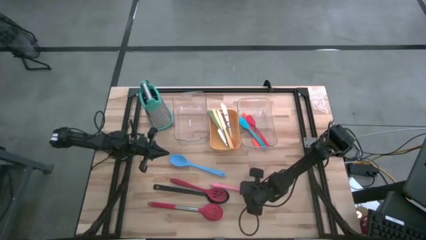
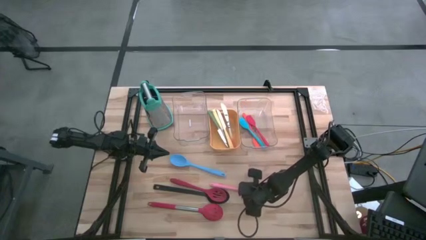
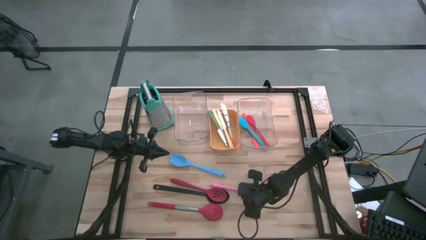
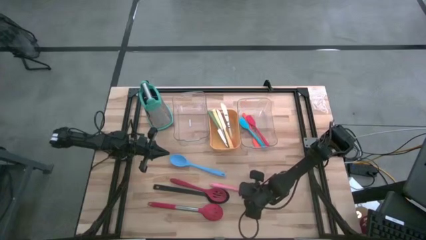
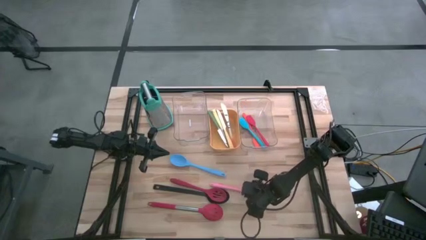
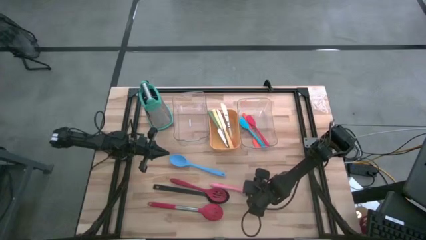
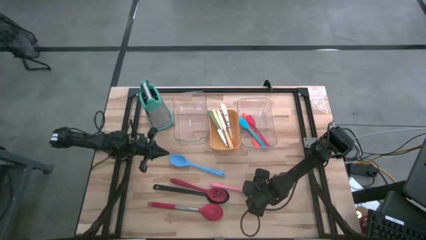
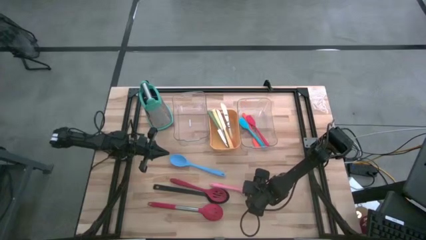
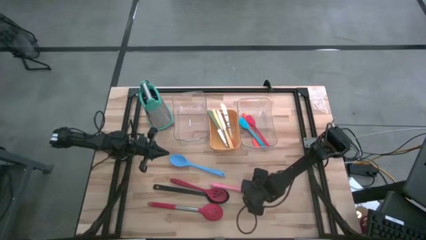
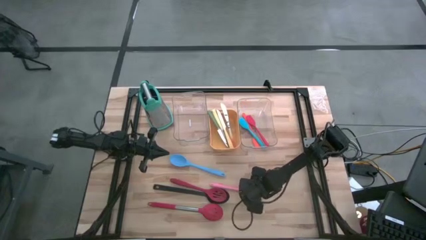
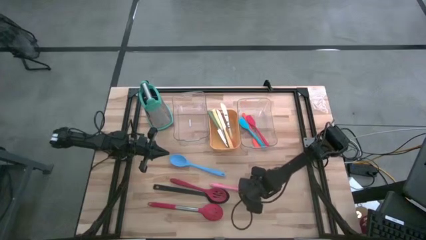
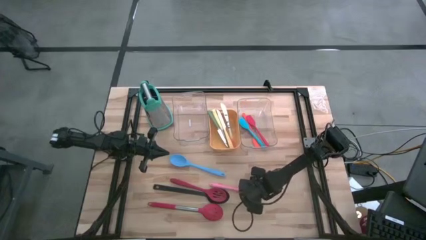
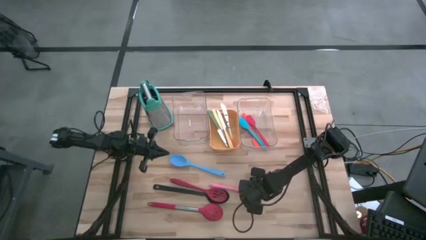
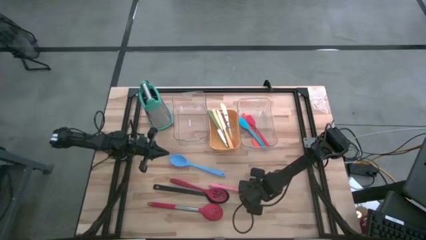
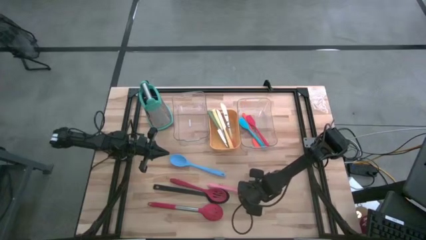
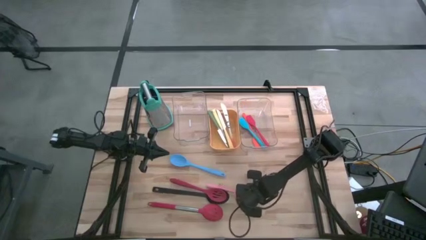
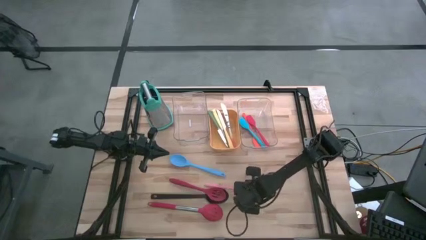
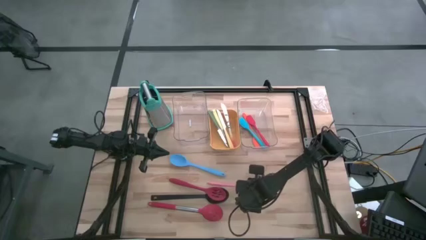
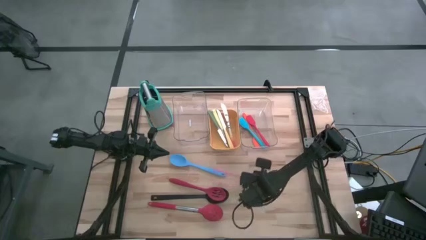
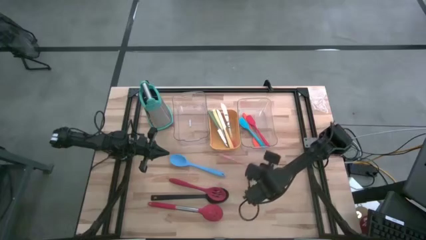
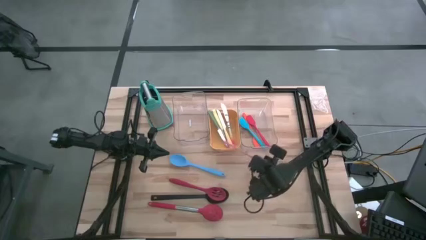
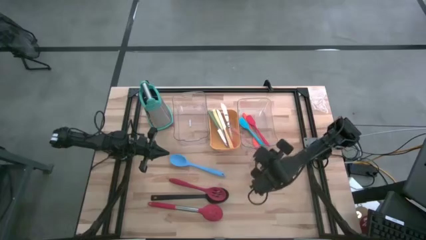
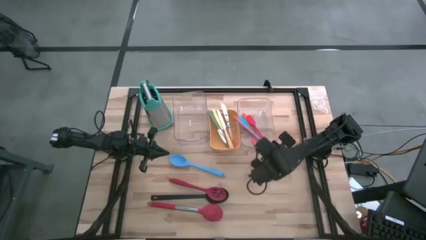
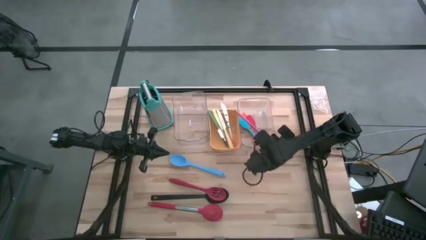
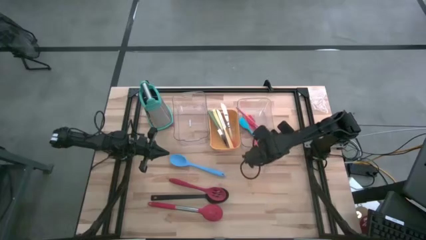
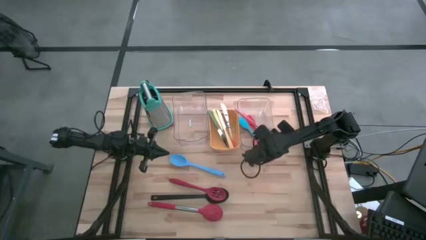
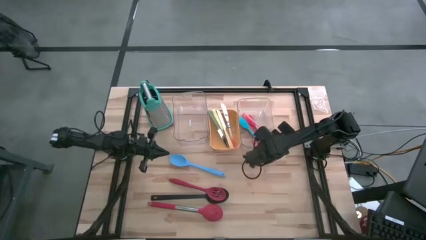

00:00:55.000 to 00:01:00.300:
Task: Pick & Place Kitchen Items
Put the pink spatula into the right transparent bin

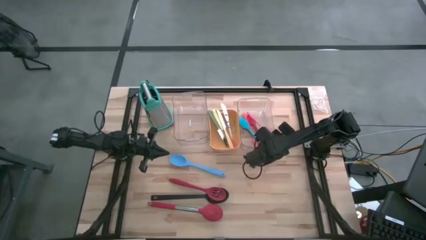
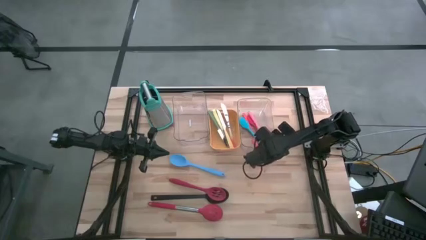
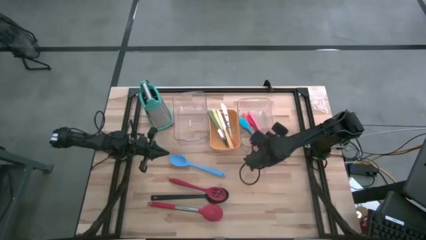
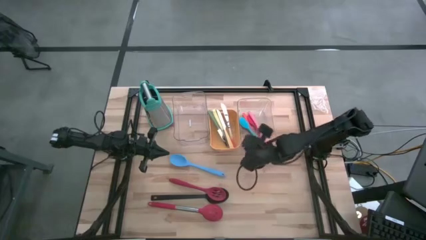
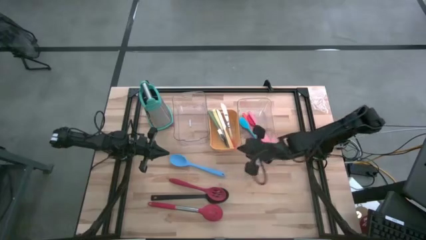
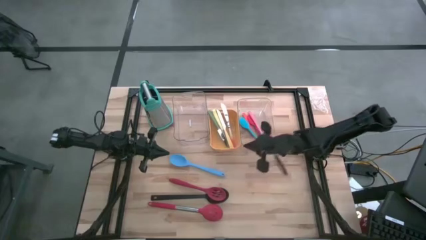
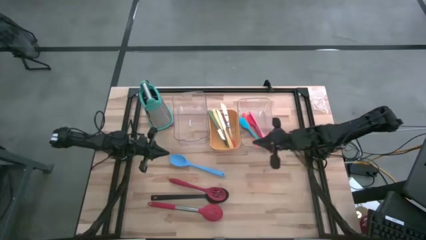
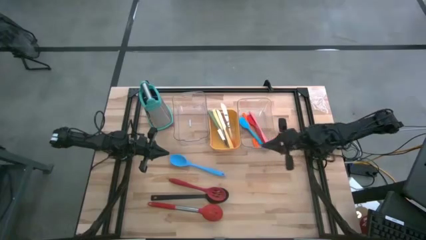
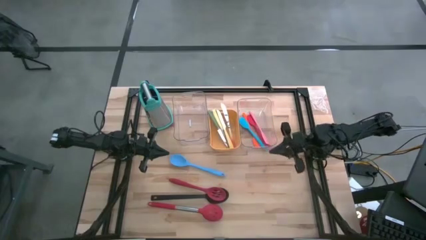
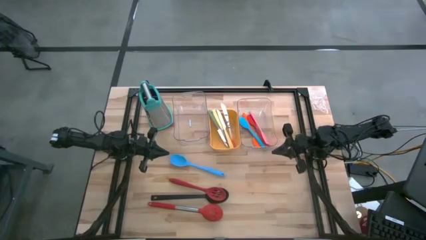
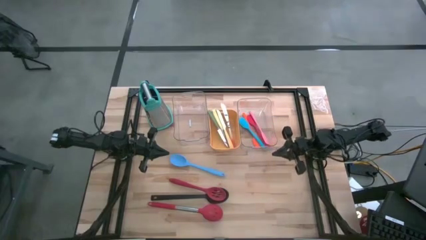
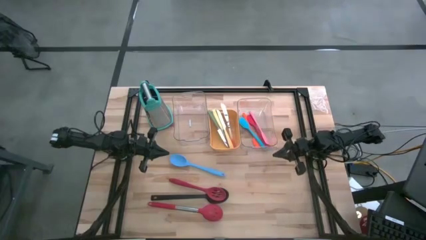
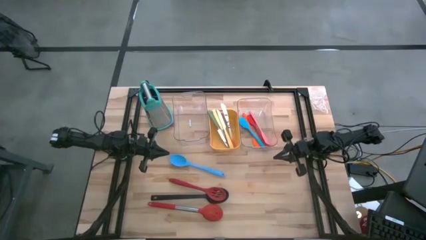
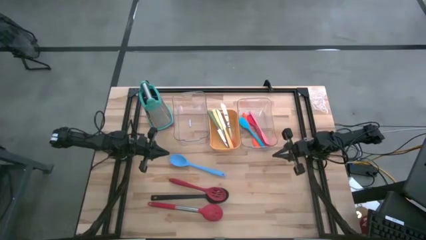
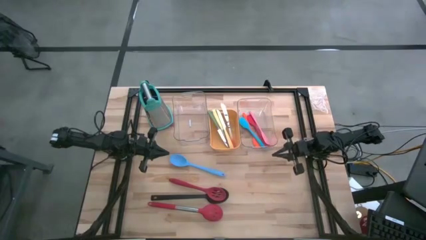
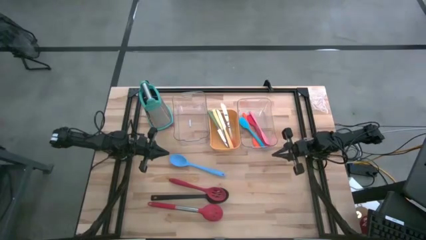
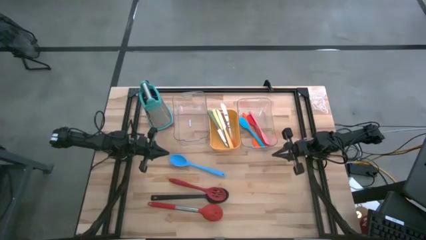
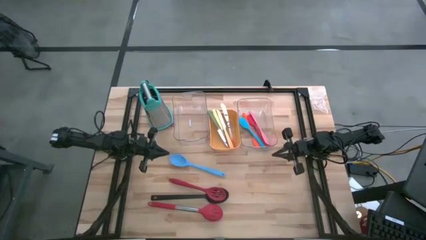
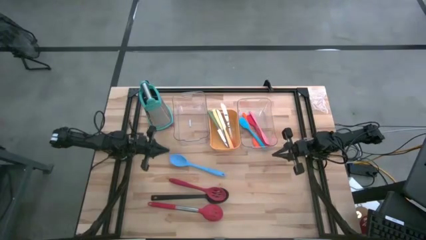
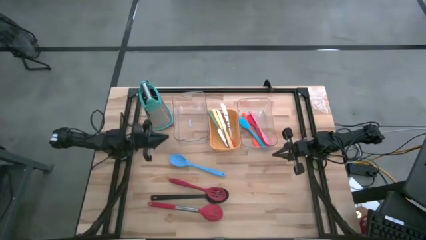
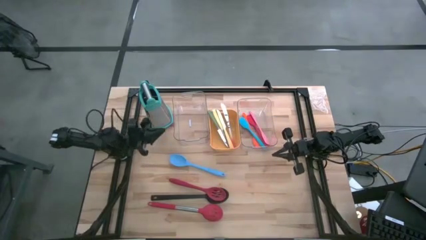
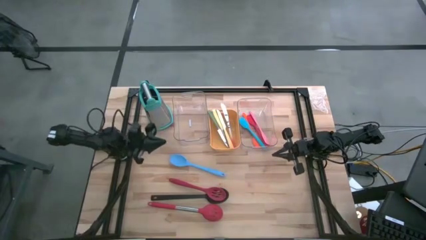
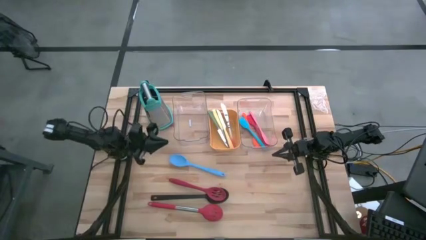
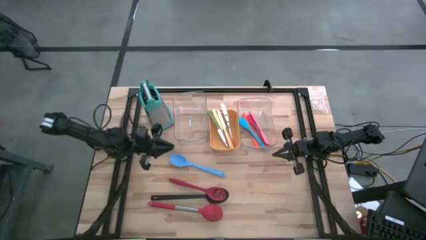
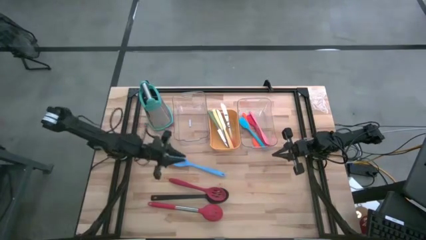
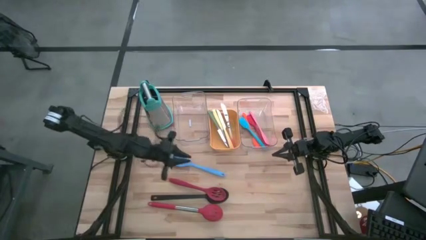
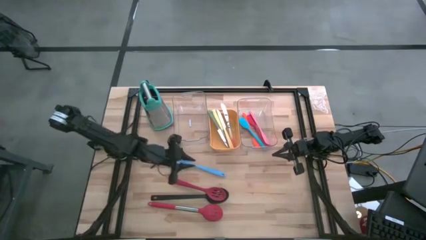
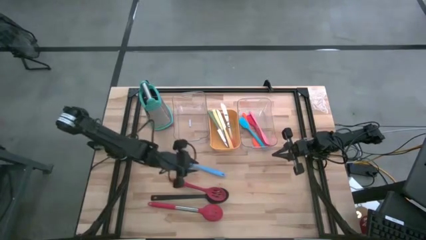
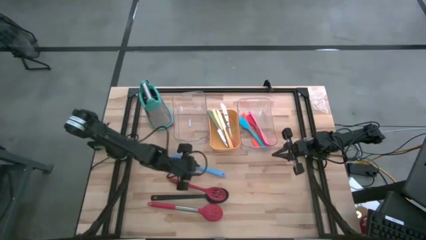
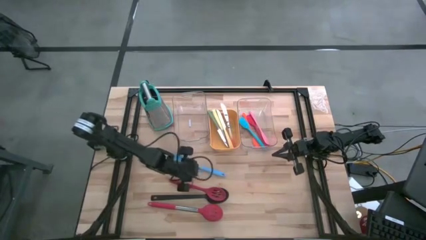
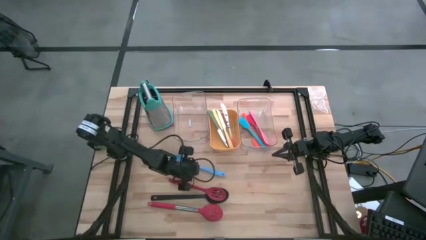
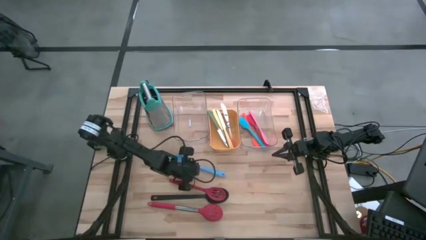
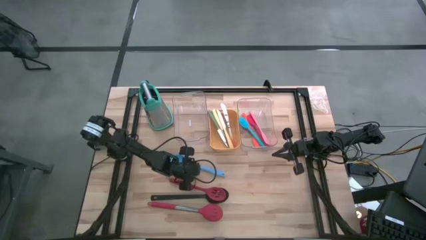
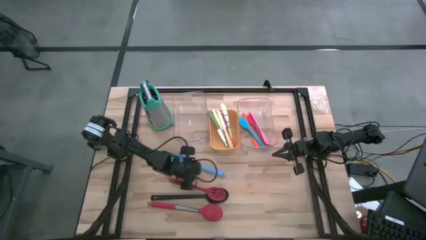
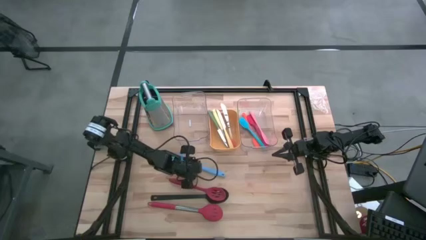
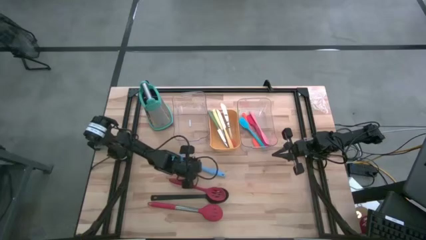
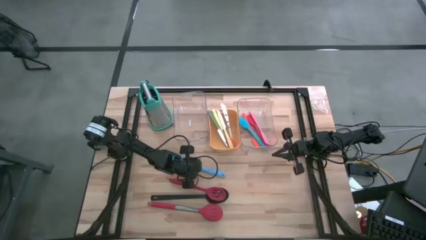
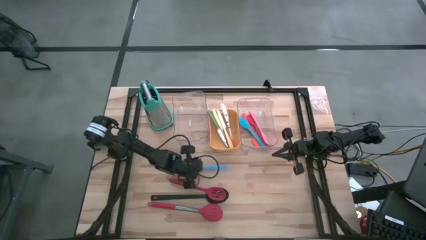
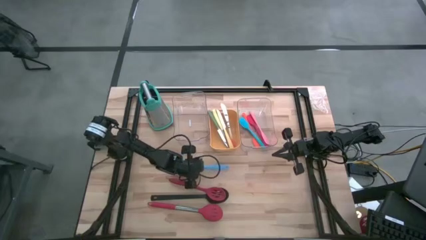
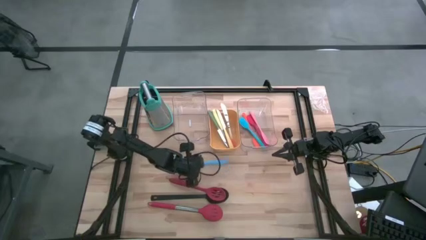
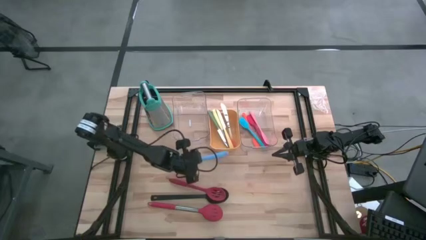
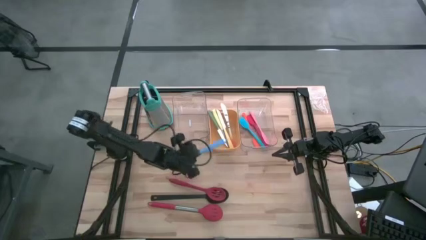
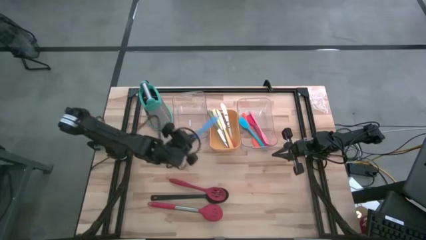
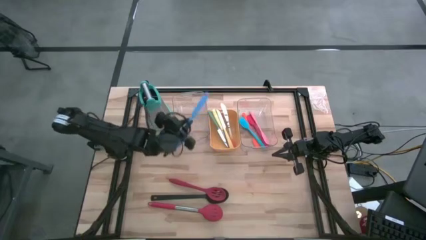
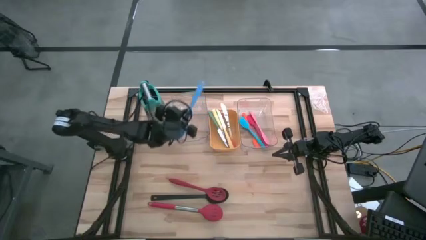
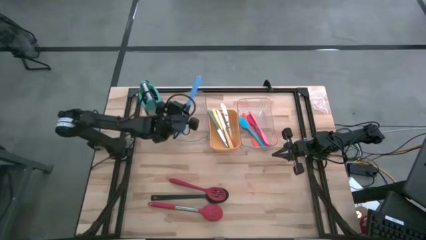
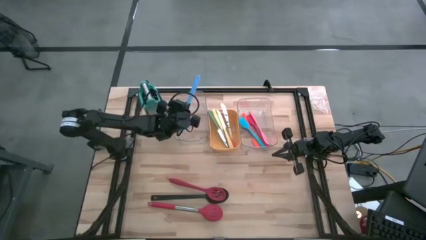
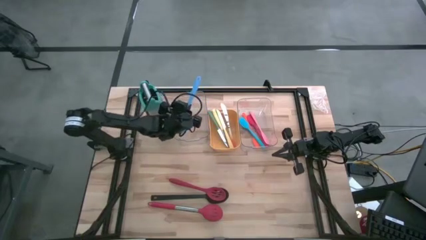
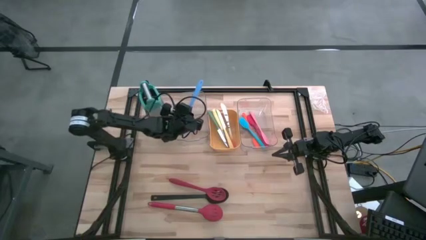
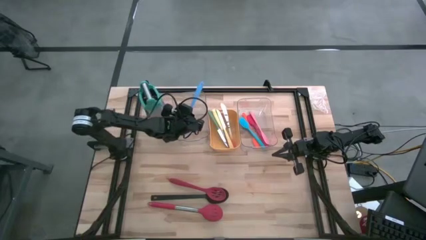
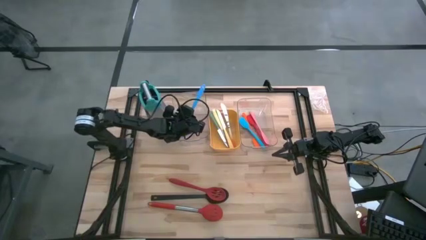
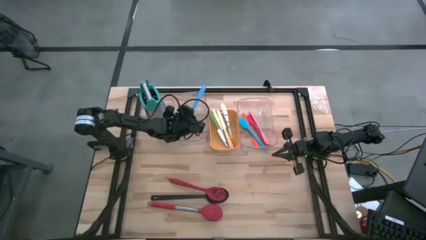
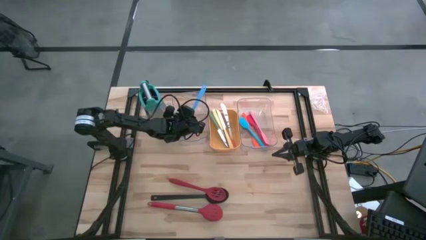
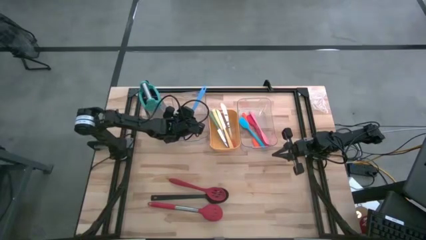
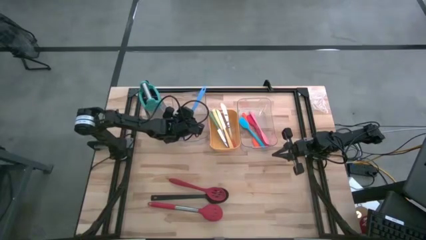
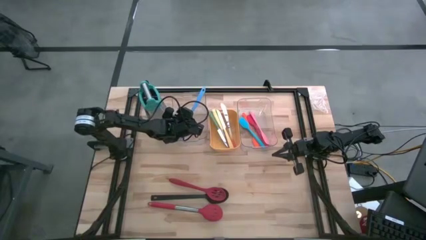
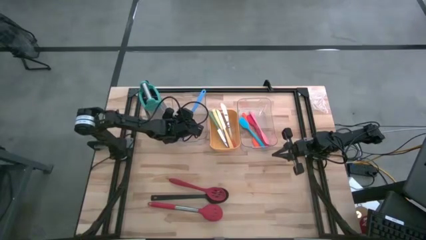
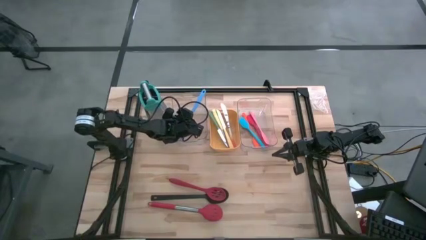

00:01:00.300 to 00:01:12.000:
Put the blue serving spoon into the left transparent bin
